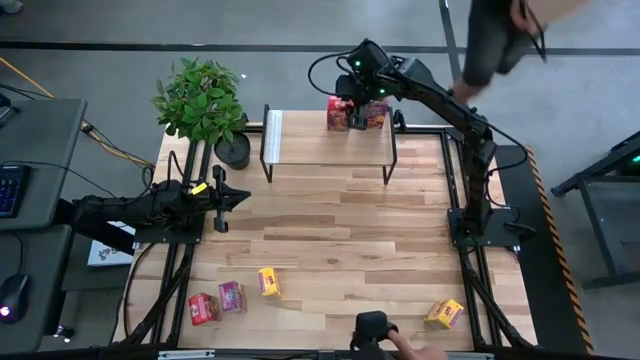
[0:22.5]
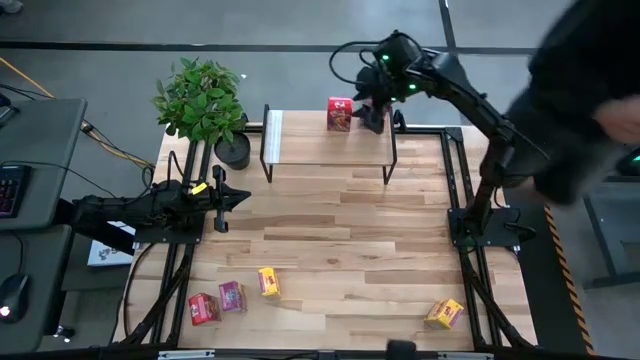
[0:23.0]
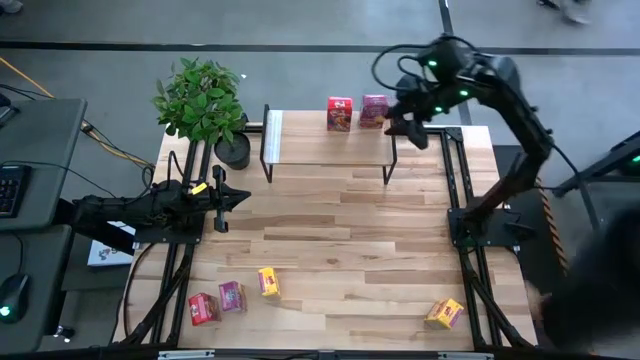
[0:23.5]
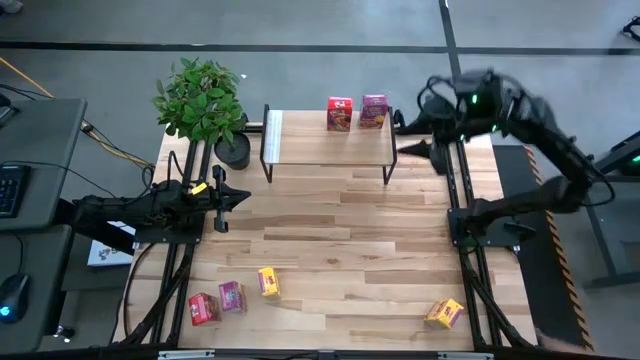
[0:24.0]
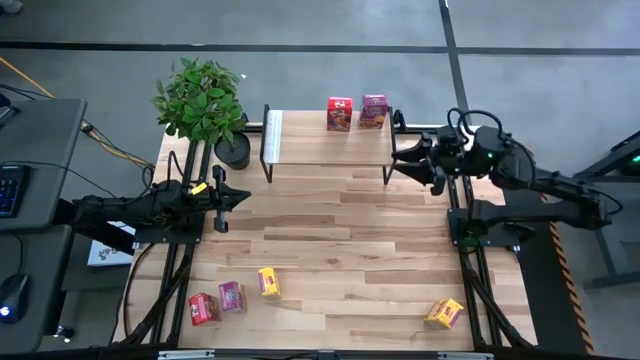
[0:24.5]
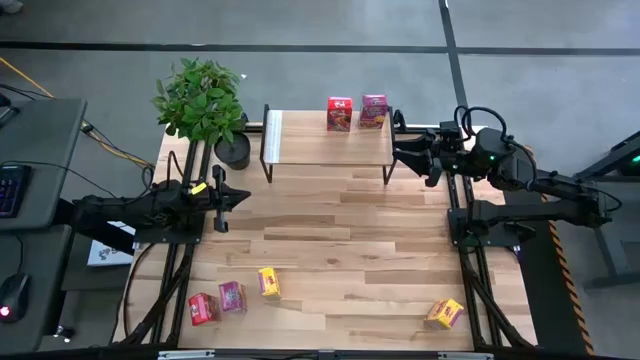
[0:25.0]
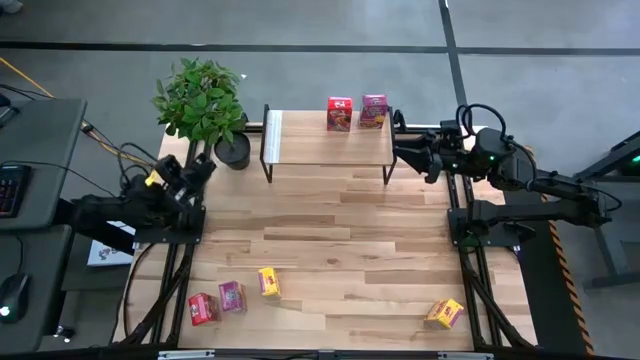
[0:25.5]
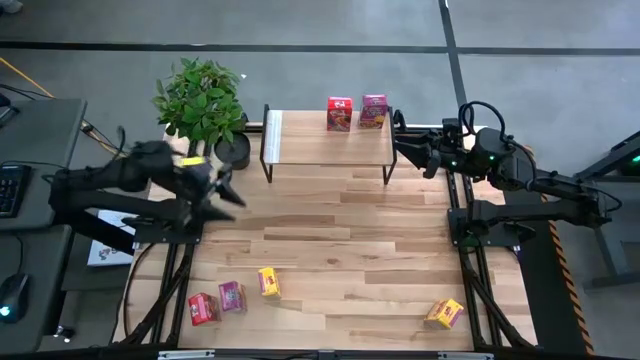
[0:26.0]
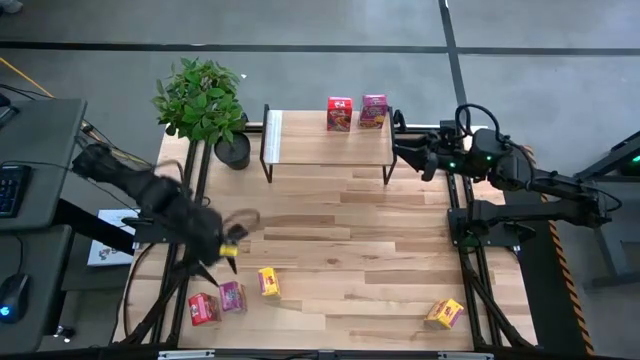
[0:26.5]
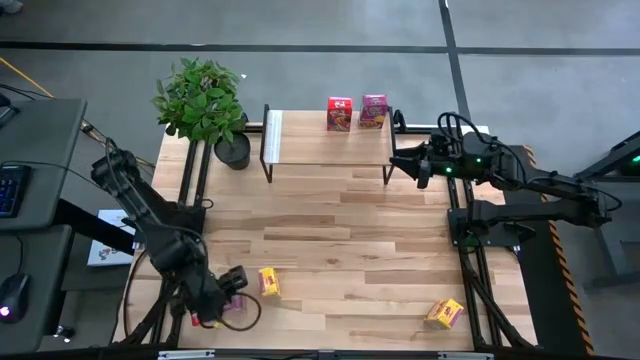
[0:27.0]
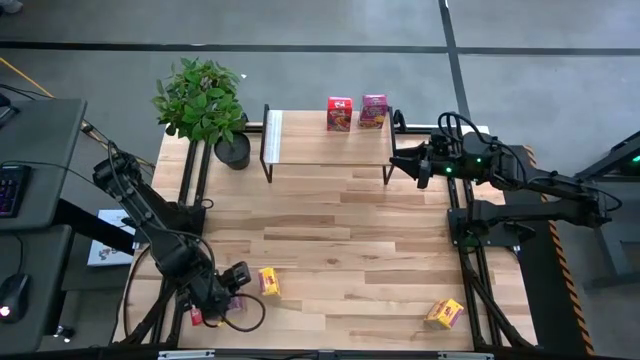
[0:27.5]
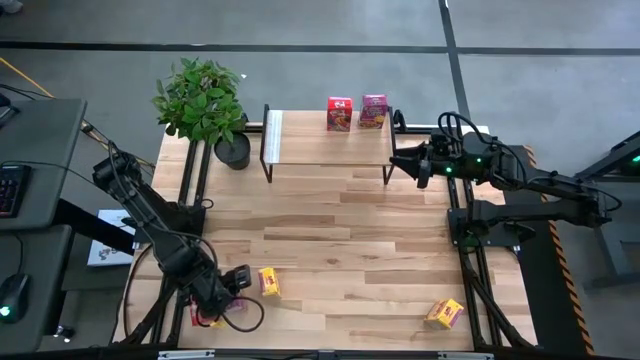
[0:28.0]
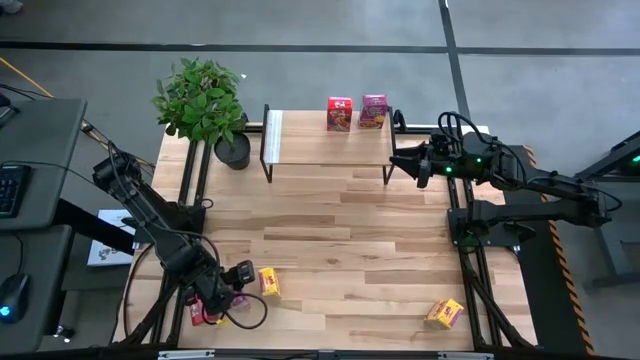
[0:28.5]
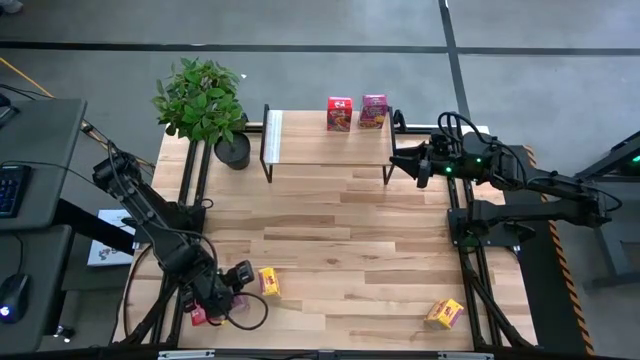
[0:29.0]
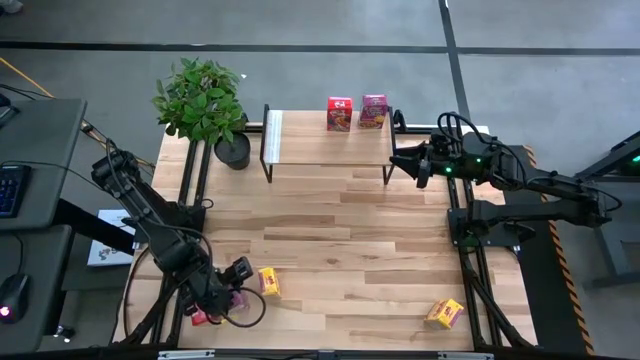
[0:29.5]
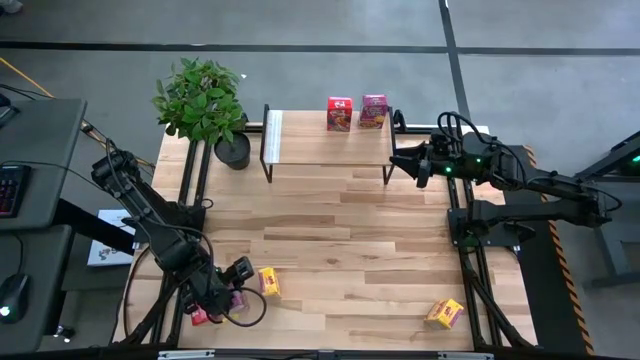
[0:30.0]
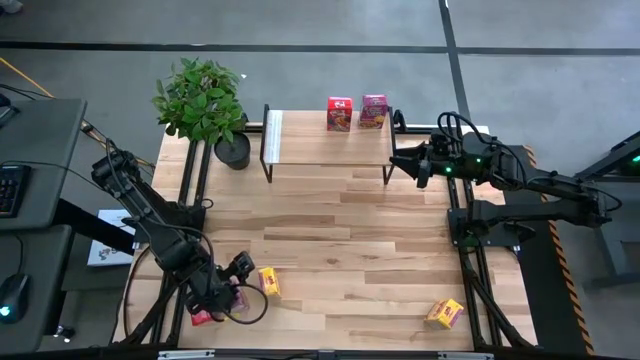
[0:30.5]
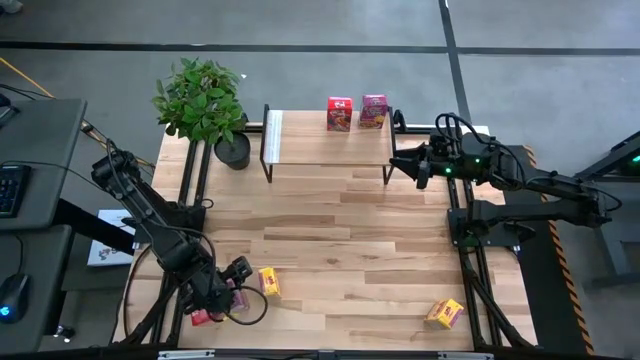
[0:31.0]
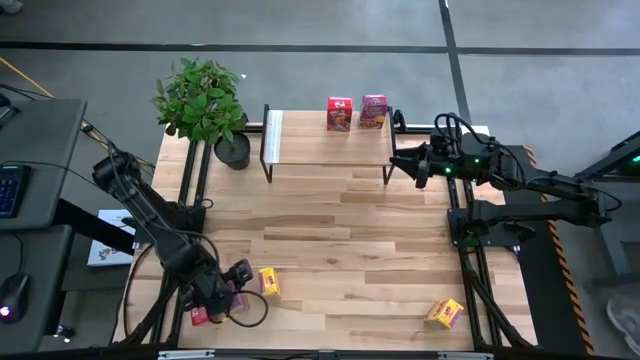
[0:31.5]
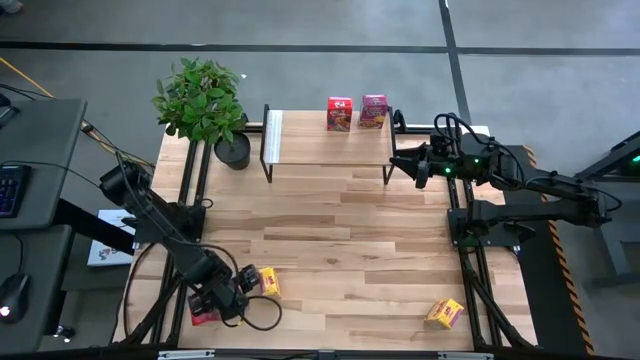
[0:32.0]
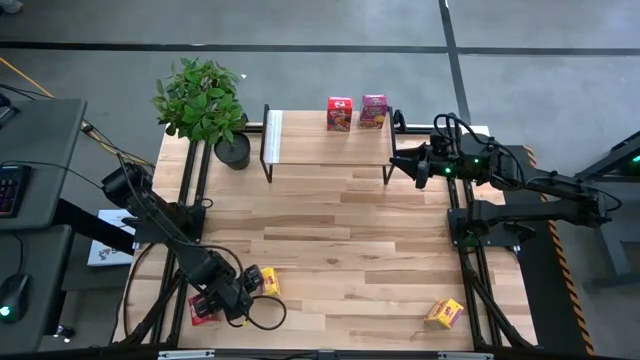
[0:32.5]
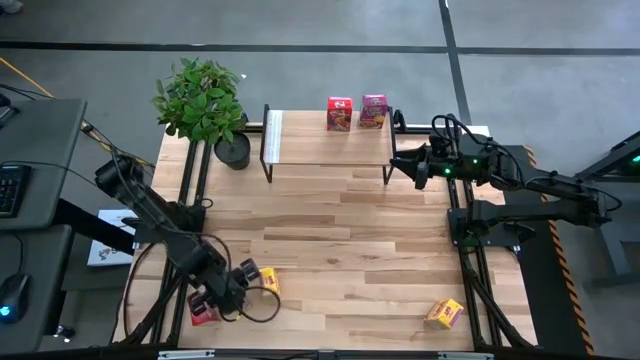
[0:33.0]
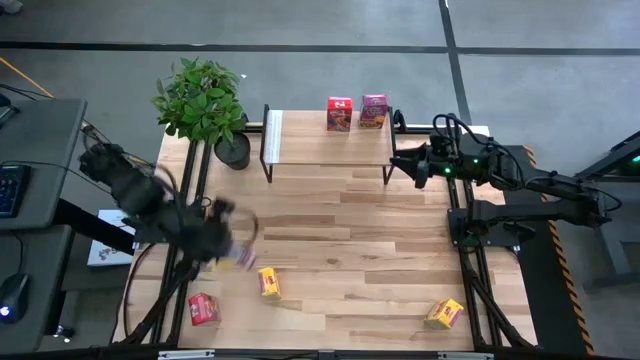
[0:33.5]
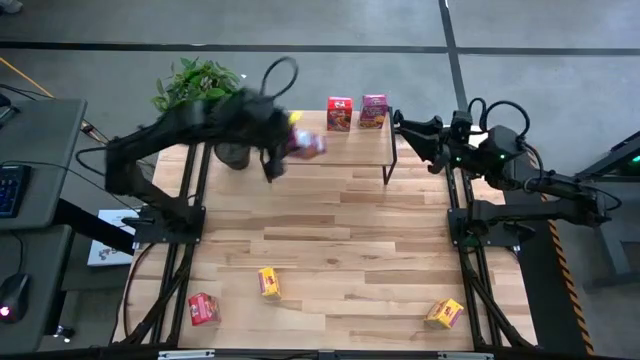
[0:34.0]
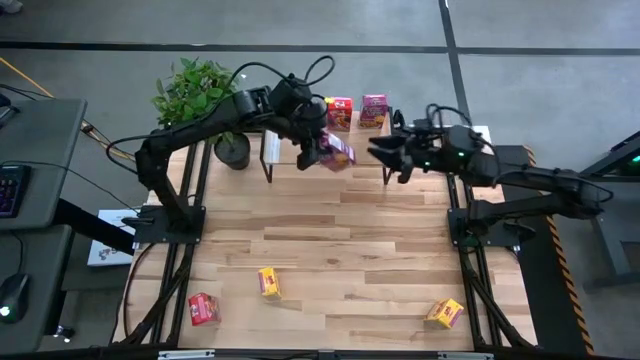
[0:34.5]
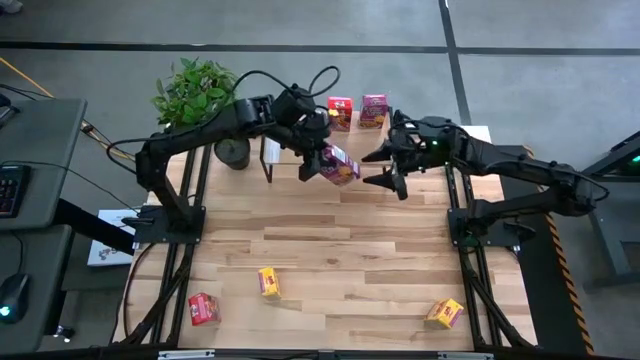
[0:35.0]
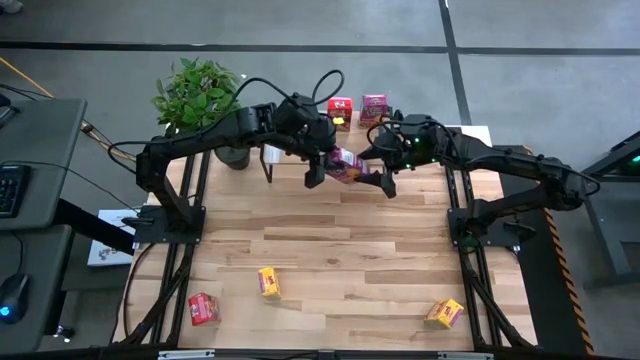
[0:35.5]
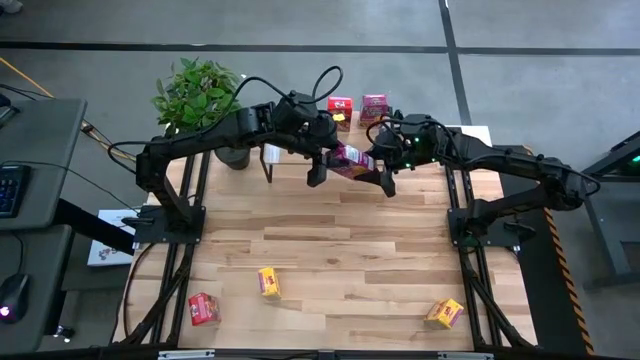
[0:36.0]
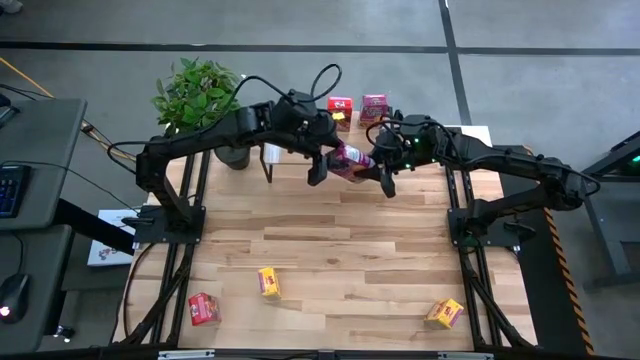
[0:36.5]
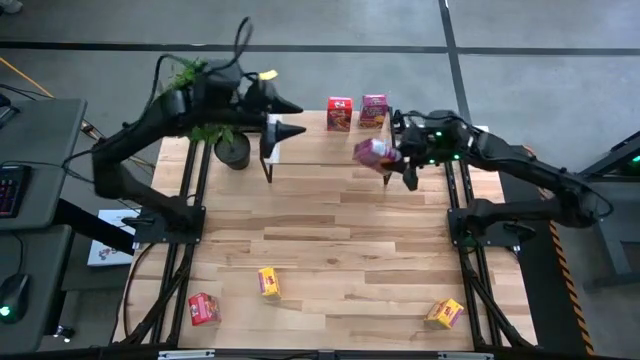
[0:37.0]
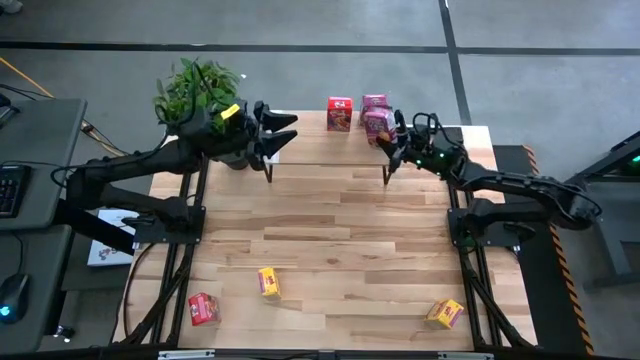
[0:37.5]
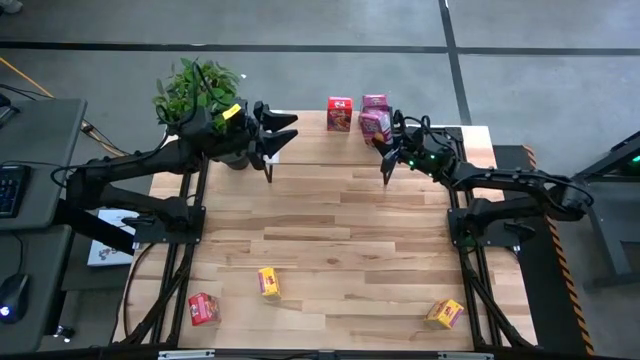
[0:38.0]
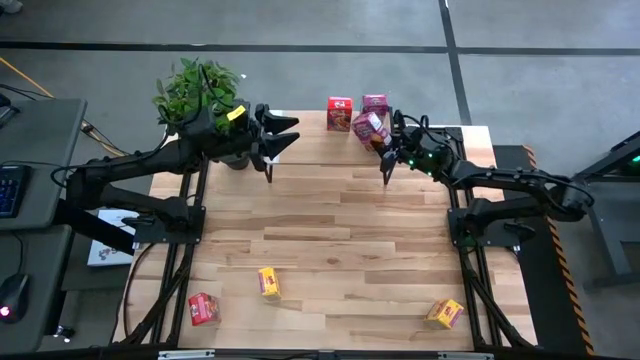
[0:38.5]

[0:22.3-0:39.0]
Task: Stack cereal on shelf
Put the purple cereal box on the shelf

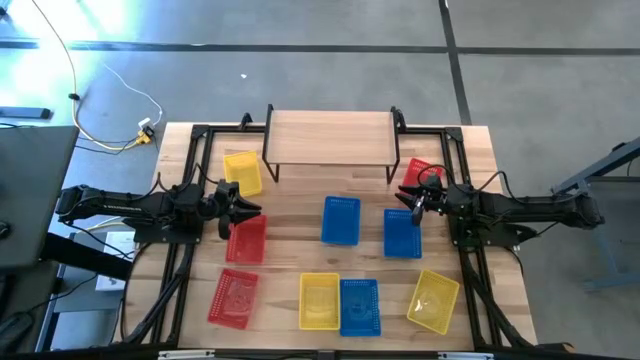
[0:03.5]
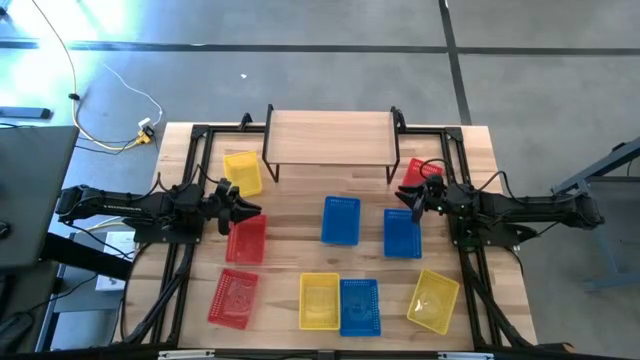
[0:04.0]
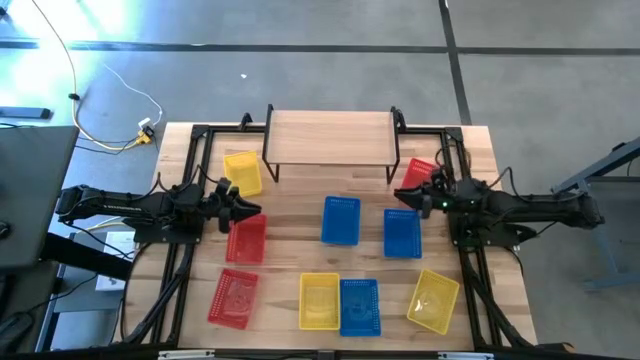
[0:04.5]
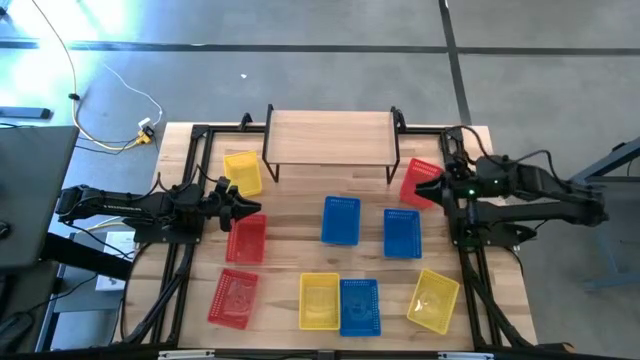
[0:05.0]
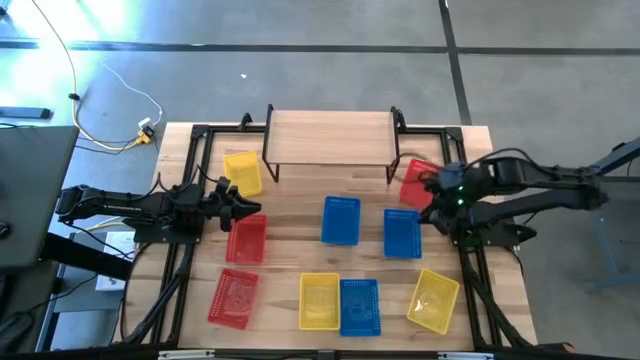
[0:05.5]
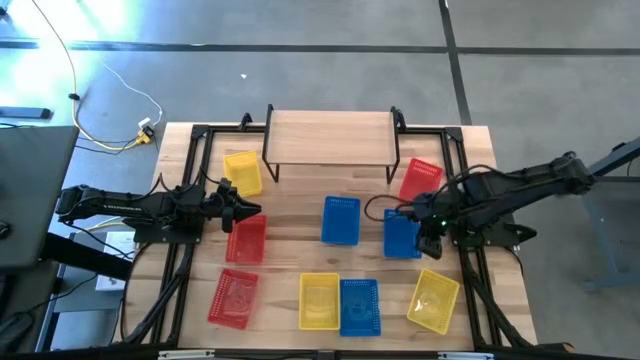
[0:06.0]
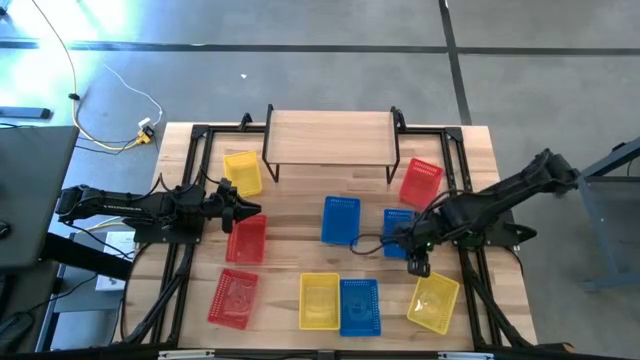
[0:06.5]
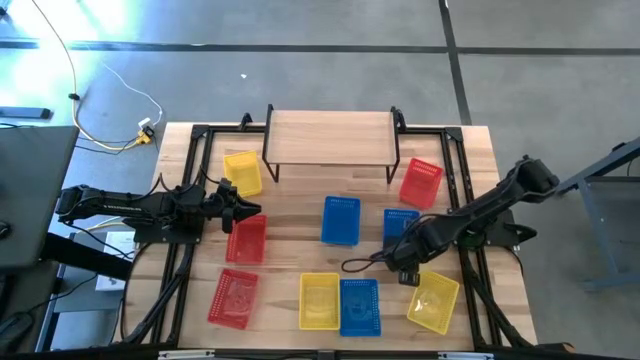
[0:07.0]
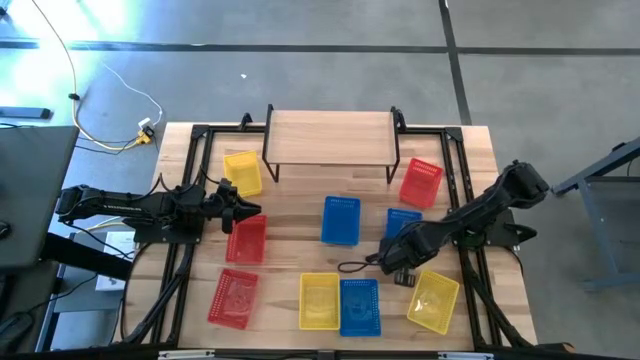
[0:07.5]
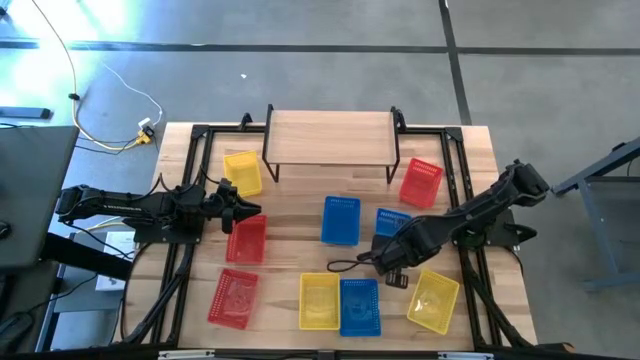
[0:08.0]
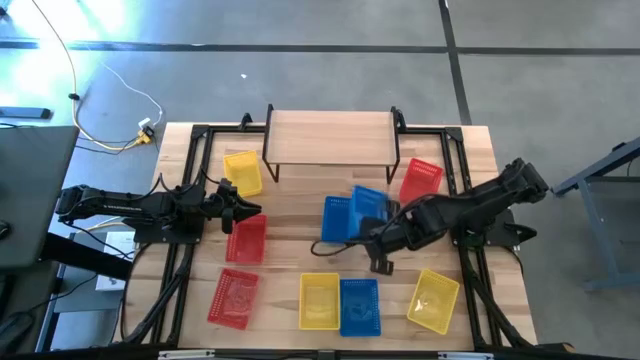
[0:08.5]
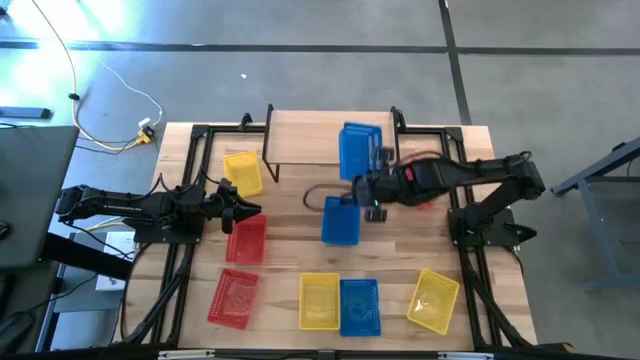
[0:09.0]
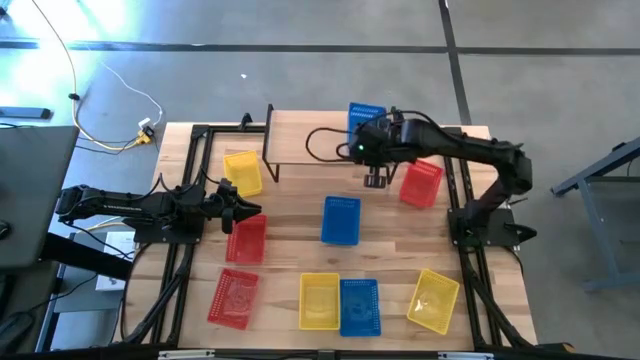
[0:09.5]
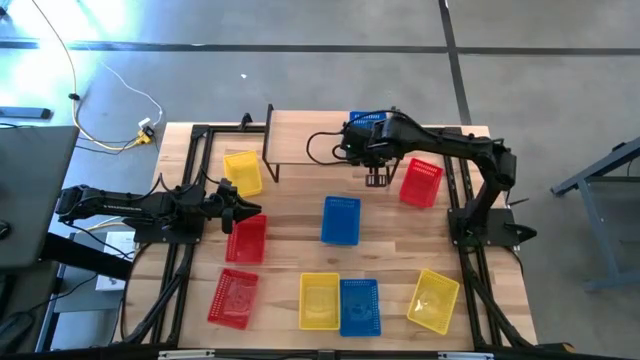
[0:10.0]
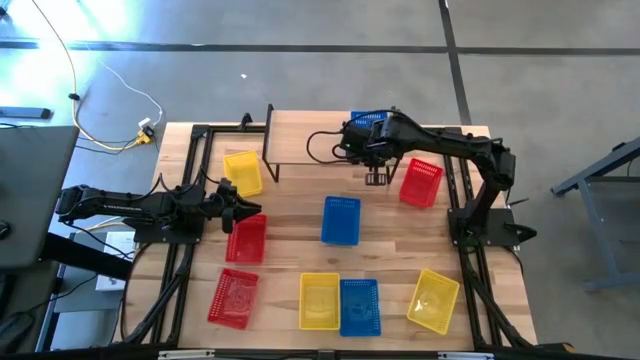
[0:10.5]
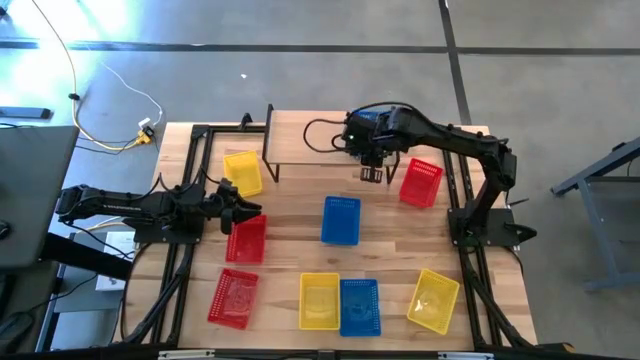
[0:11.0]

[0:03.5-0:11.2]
Task: Stack baskets on shelf by color
Put the middle right blue bin on the shelf
